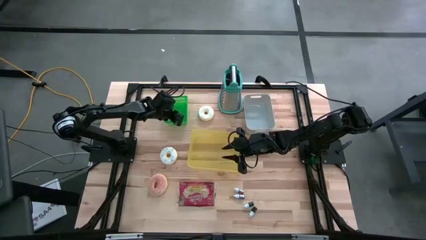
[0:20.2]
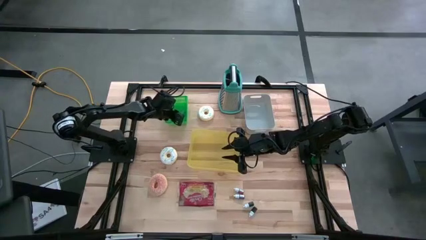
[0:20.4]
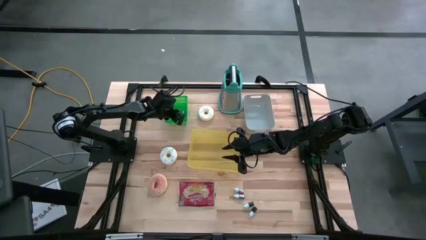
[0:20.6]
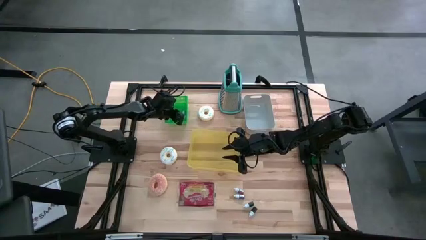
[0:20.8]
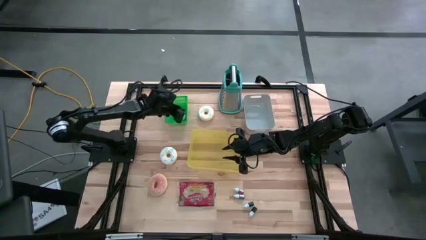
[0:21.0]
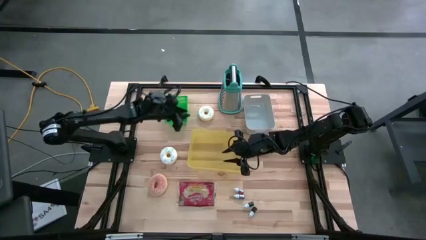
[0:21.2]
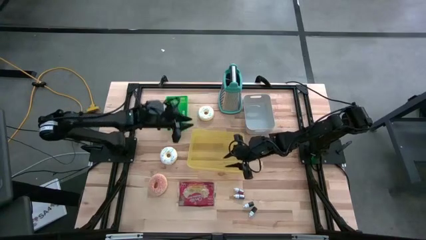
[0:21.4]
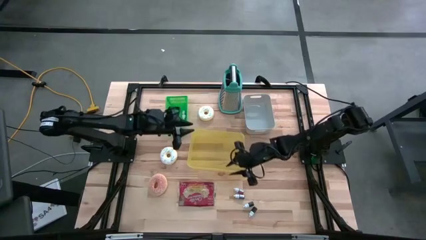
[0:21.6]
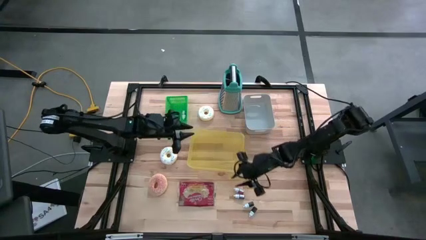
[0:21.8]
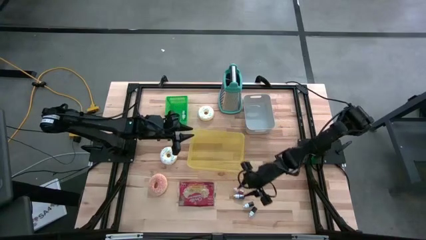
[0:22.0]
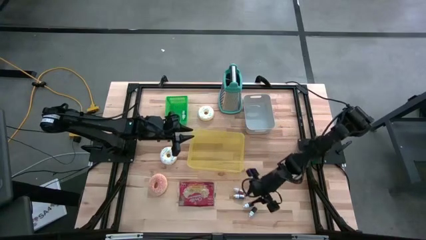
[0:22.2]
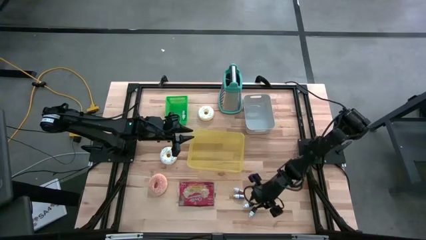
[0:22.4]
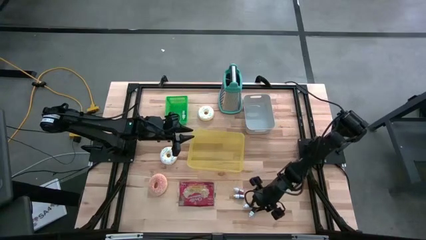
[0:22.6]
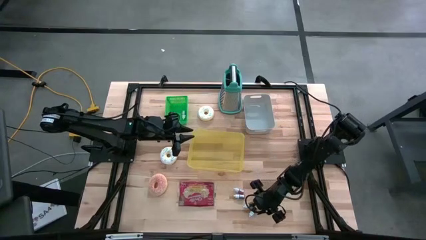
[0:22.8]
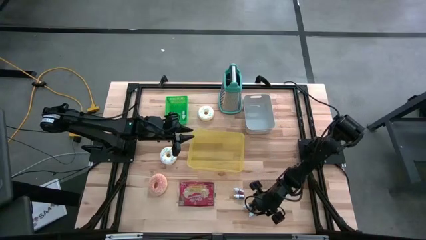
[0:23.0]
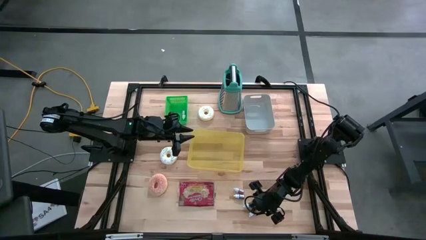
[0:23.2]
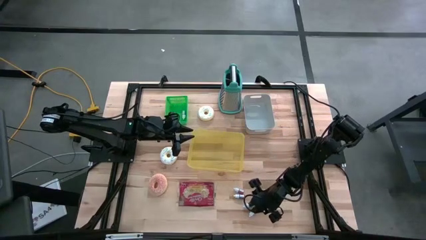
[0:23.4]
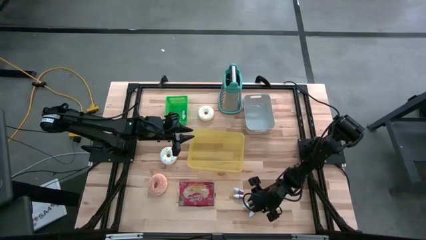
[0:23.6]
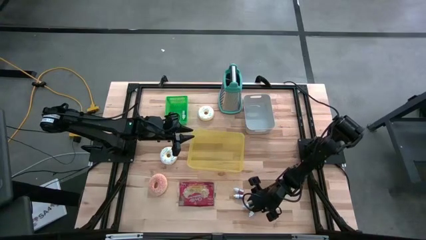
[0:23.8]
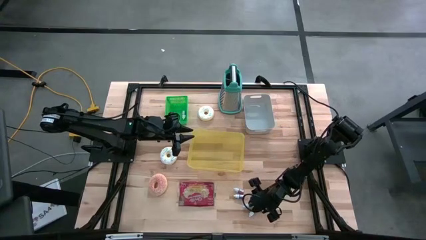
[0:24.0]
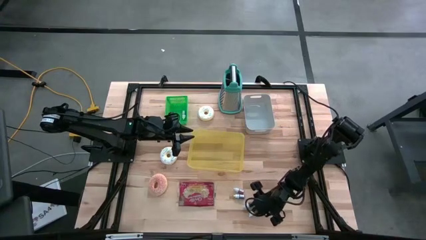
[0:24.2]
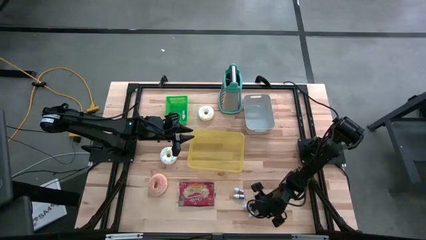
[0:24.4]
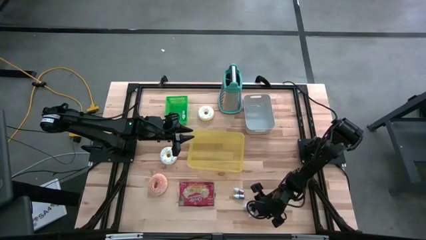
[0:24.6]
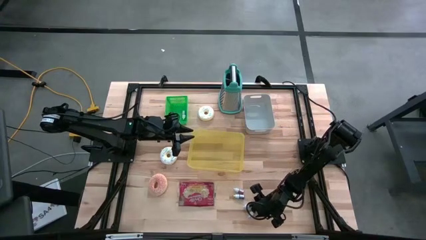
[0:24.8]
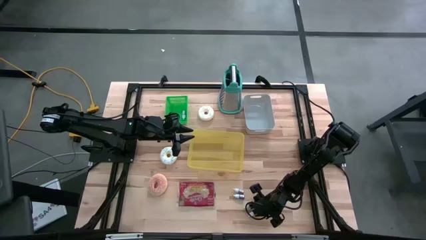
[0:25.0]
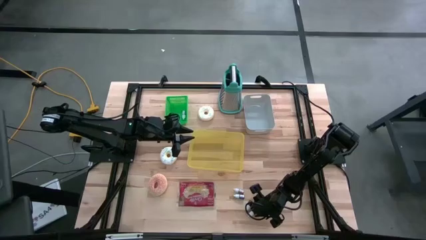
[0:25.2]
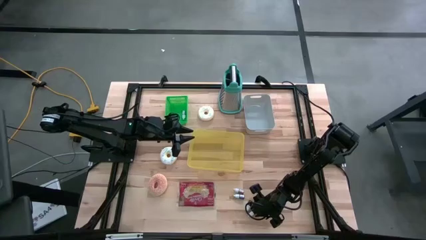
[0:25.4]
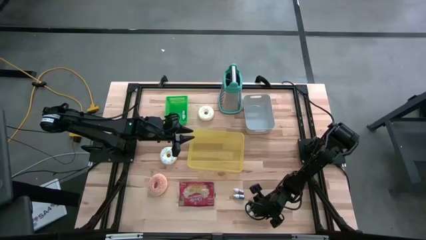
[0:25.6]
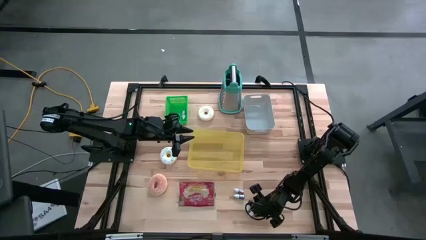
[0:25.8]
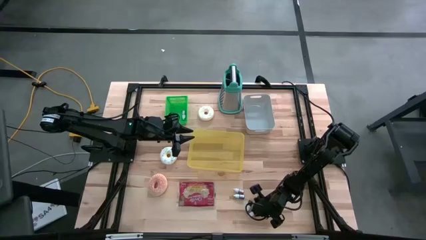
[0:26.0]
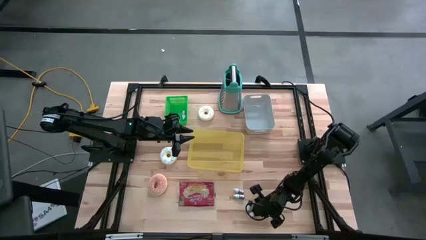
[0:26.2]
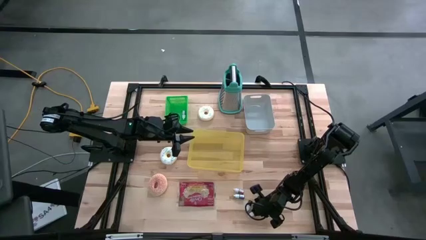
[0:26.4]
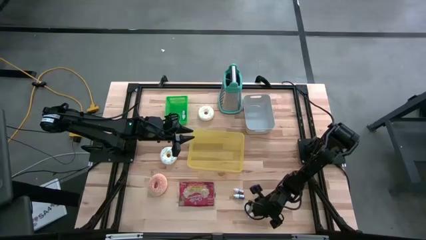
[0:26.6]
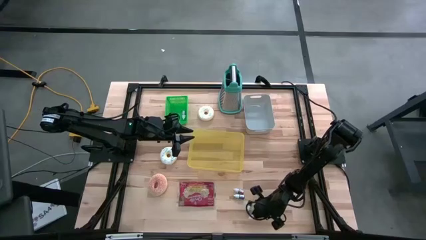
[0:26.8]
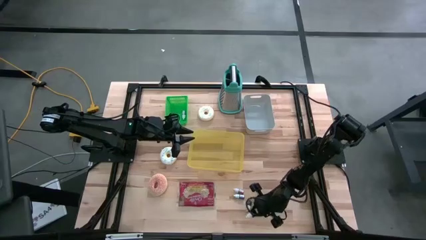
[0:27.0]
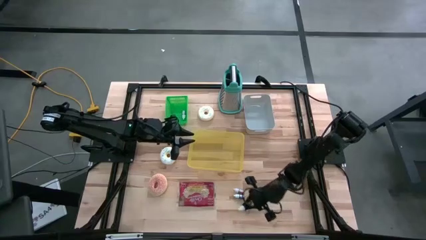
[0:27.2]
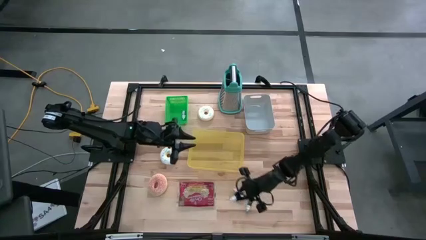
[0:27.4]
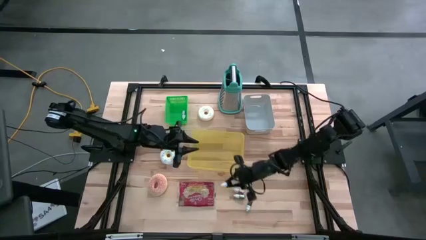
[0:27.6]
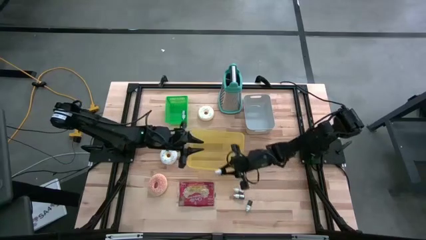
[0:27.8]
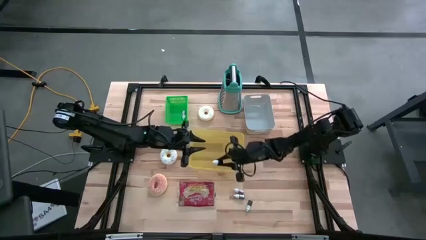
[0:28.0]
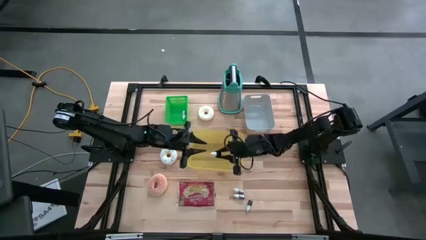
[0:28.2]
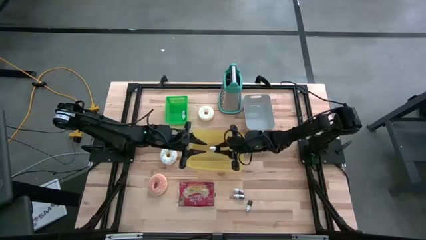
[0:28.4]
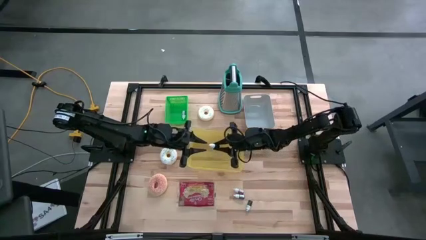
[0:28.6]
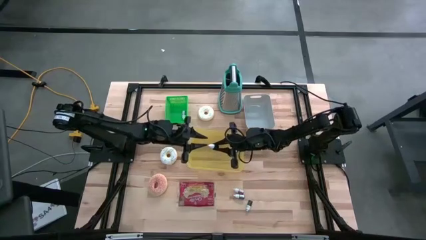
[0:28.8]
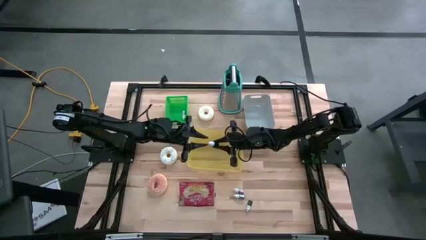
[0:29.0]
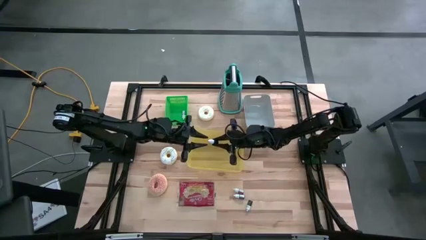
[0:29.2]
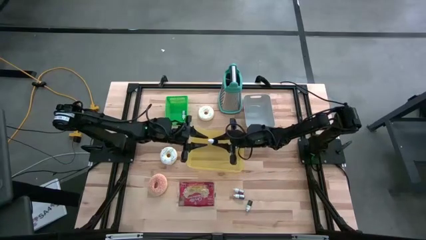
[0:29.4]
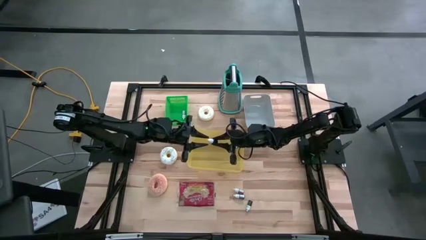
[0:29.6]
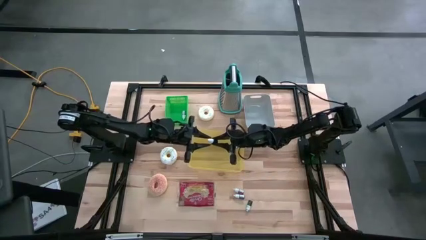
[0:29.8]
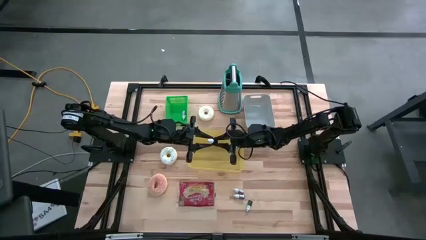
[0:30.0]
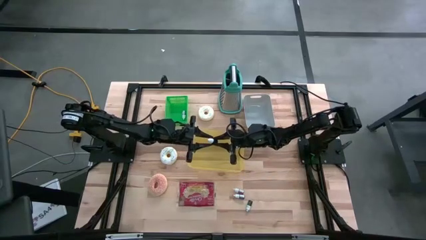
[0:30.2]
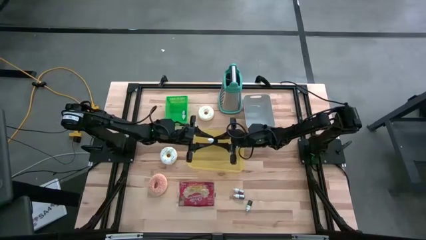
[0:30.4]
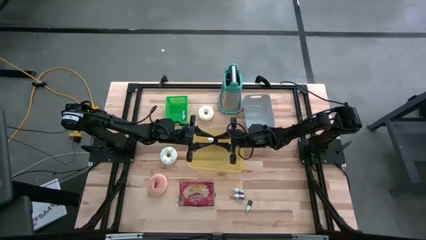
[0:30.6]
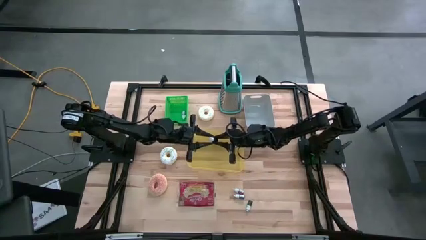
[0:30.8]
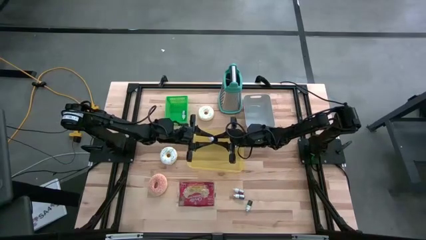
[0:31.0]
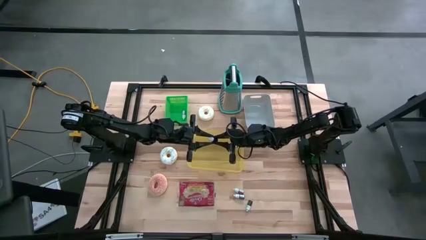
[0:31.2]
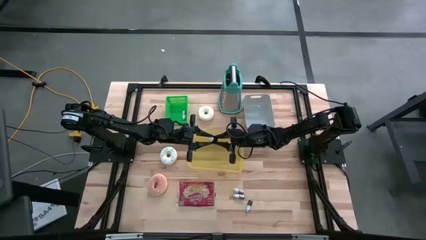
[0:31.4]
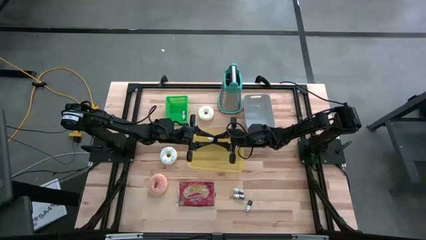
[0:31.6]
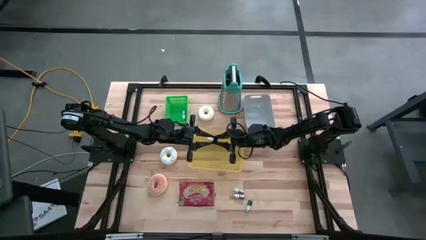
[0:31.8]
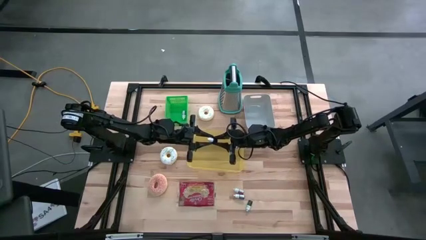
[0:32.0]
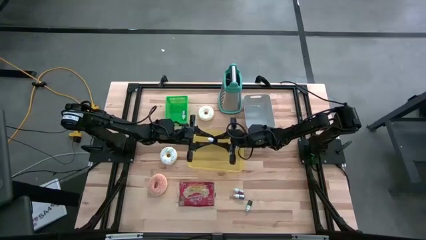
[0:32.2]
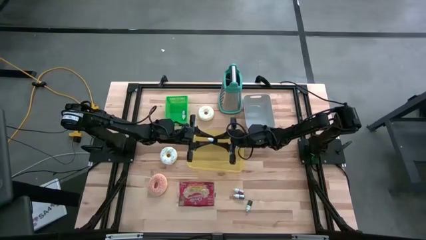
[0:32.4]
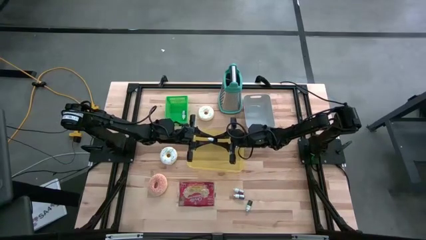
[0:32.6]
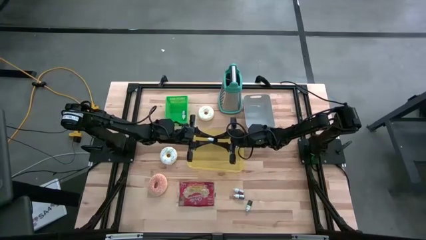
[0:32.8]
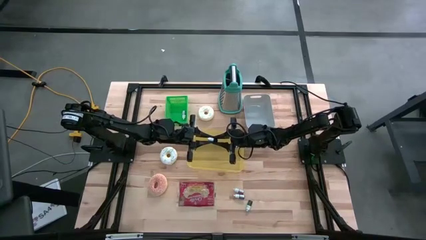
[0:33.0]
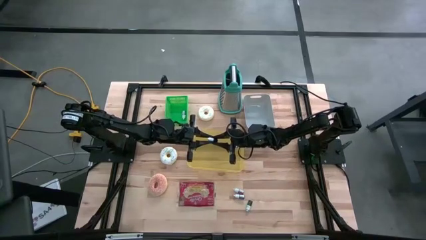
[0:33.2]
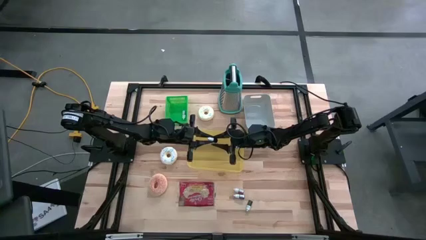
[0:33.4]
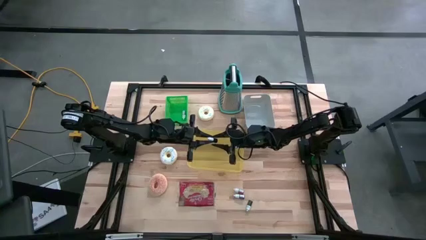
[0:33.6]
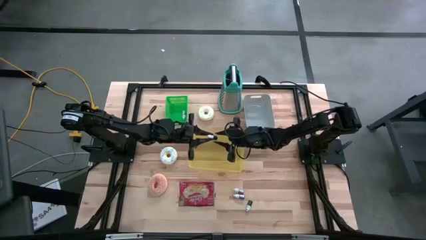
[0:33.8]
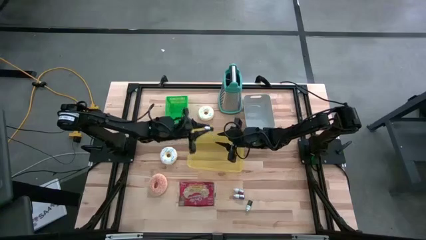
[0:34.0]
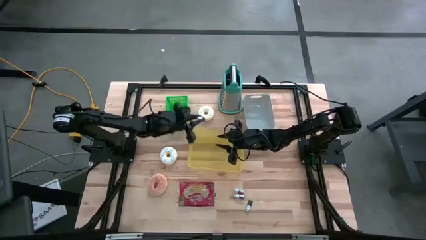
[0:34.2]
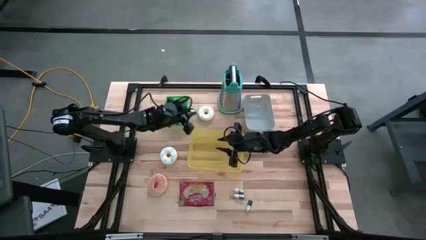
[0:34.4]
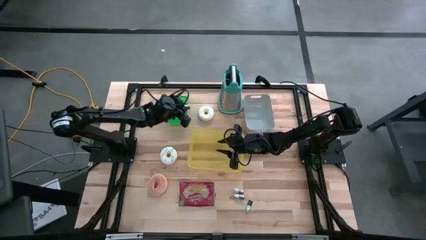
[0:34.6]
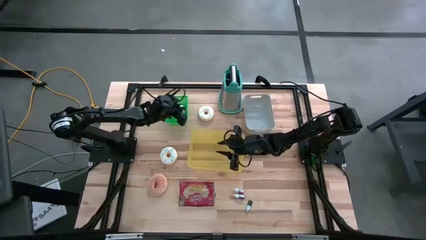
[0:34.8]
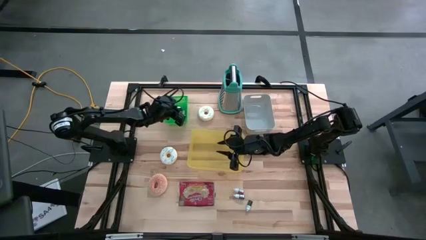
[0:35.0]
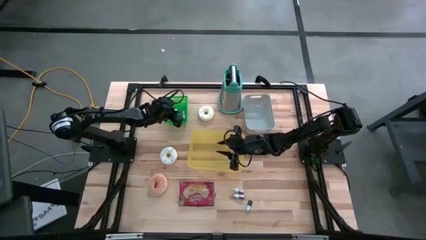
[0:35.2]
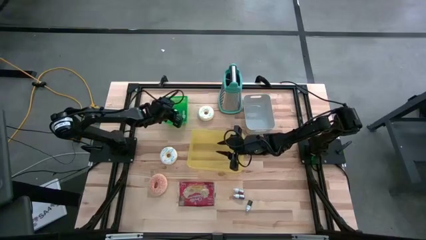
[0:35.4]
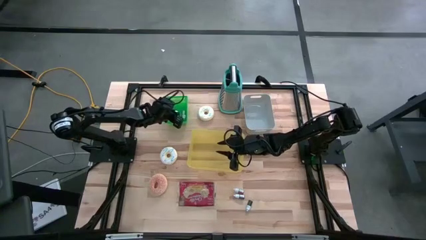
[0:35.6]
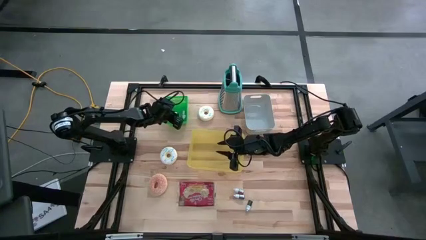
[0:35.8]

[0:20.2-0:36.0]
Put the black food coloring bottle into the green bin
